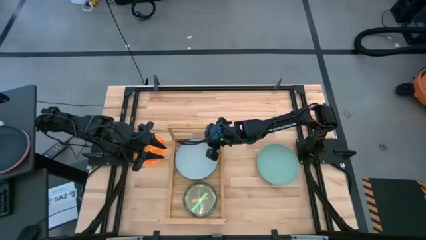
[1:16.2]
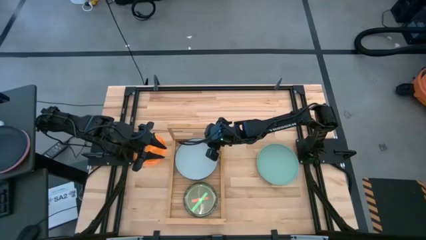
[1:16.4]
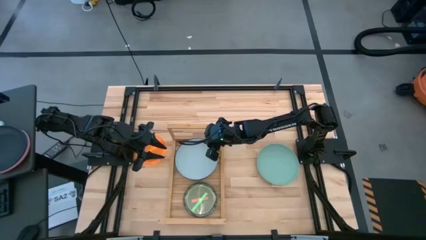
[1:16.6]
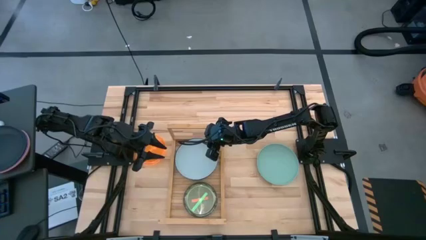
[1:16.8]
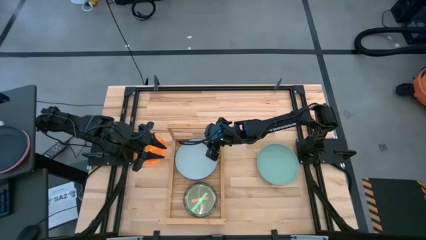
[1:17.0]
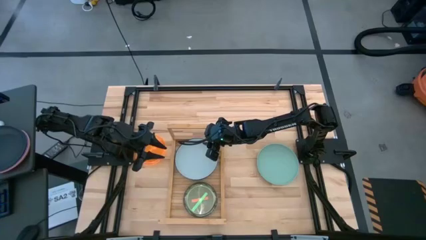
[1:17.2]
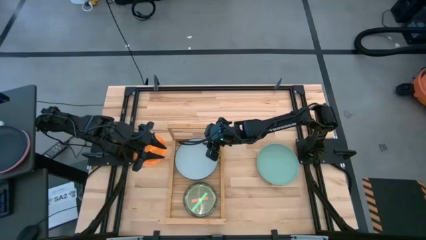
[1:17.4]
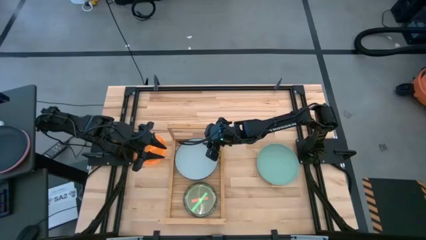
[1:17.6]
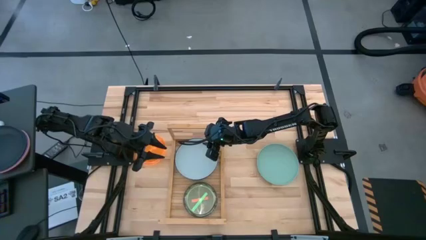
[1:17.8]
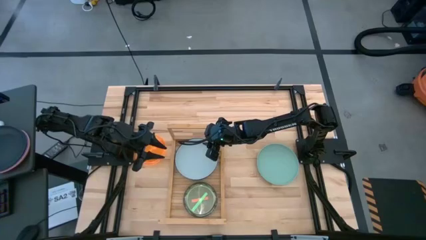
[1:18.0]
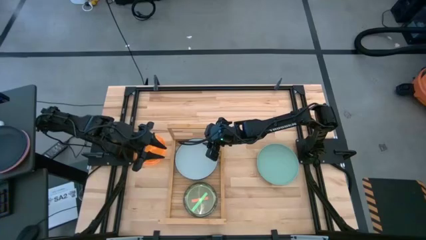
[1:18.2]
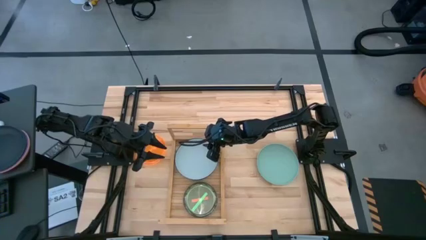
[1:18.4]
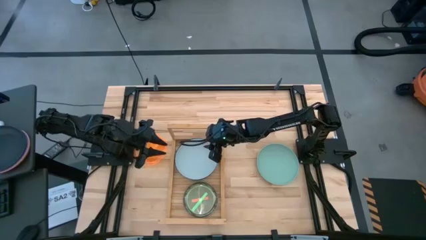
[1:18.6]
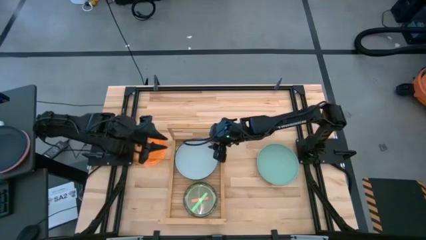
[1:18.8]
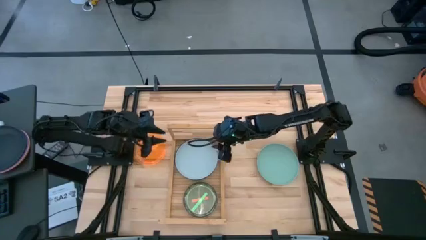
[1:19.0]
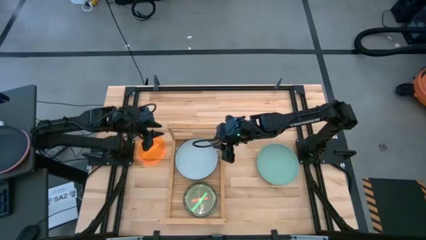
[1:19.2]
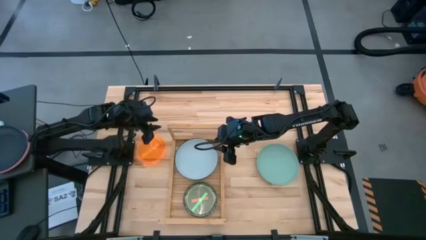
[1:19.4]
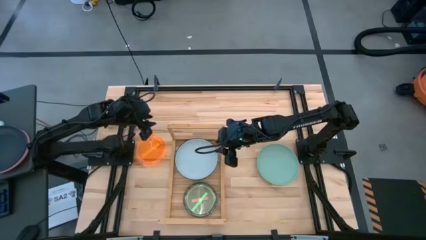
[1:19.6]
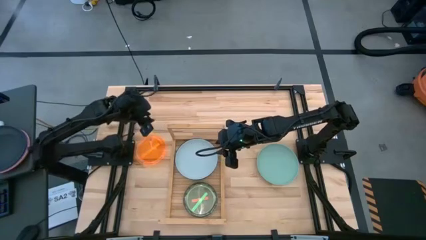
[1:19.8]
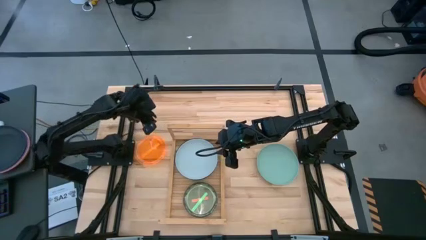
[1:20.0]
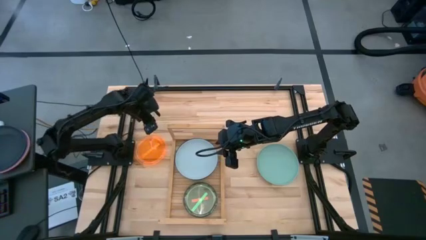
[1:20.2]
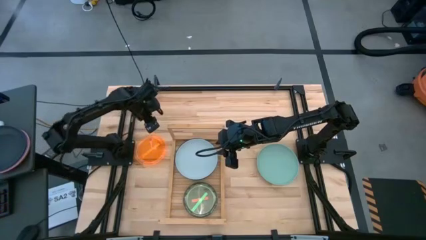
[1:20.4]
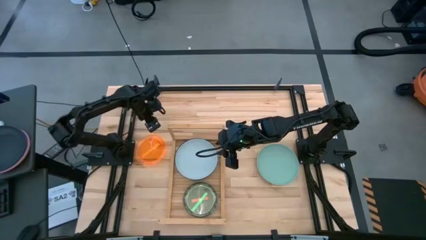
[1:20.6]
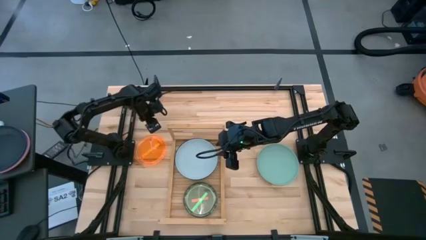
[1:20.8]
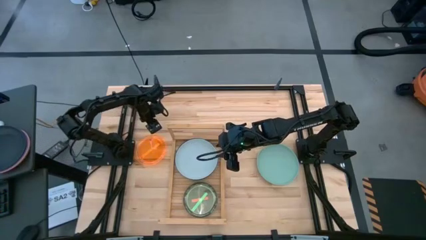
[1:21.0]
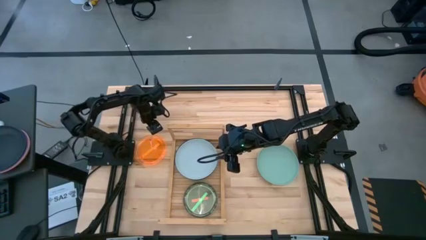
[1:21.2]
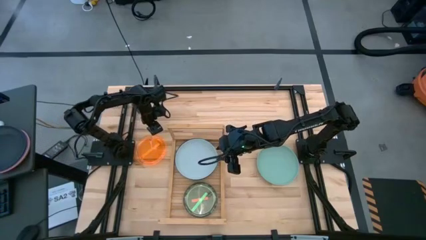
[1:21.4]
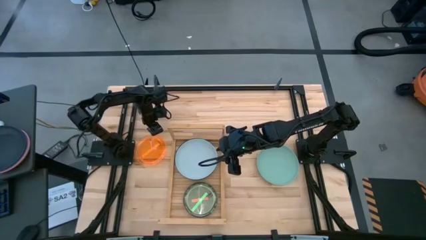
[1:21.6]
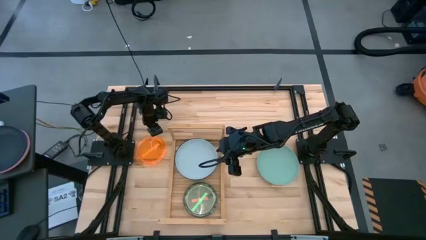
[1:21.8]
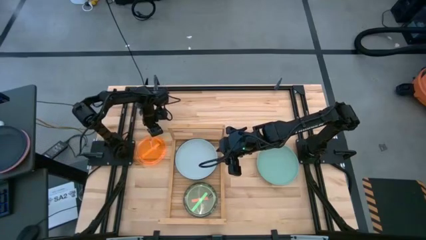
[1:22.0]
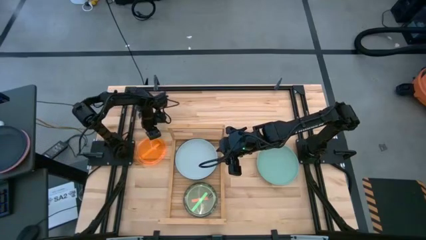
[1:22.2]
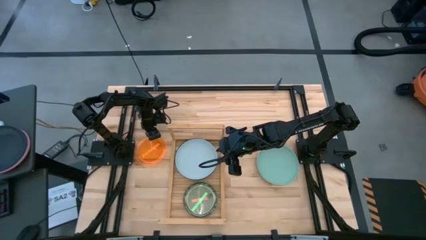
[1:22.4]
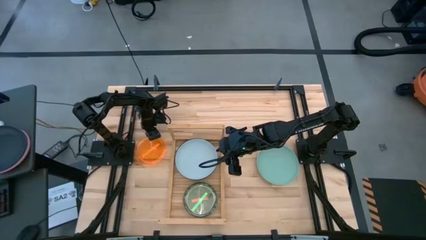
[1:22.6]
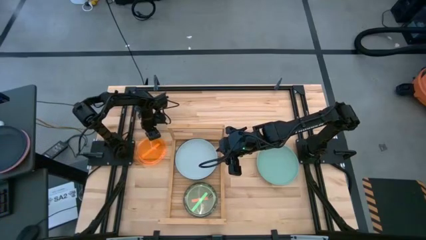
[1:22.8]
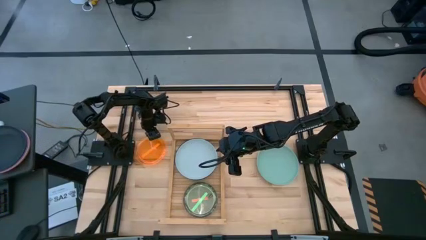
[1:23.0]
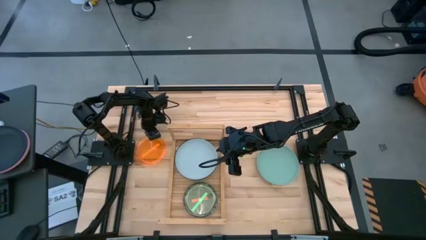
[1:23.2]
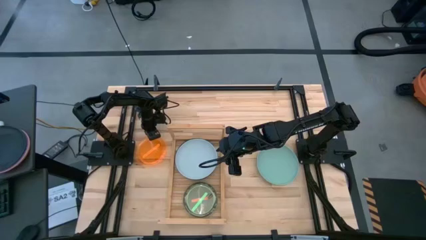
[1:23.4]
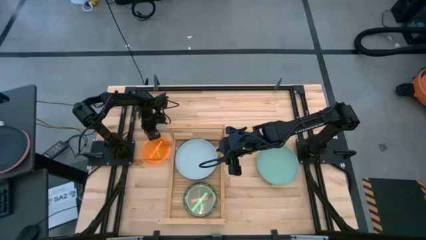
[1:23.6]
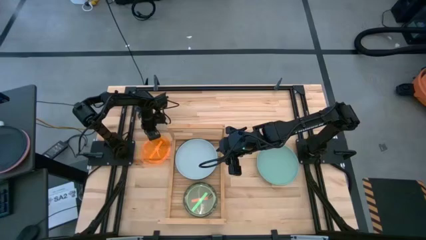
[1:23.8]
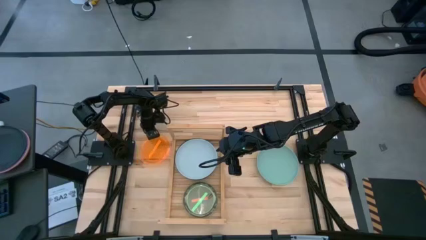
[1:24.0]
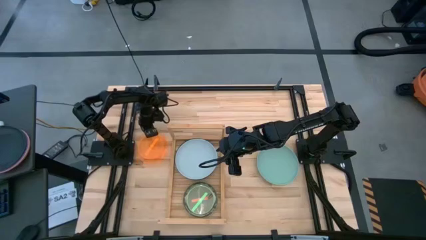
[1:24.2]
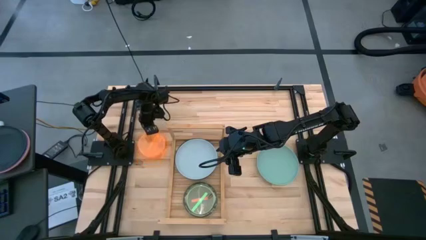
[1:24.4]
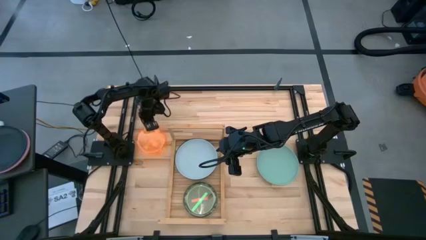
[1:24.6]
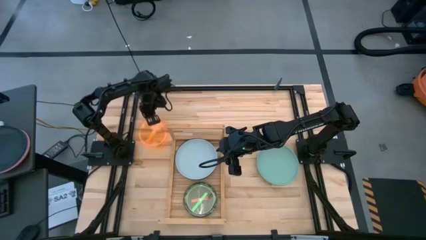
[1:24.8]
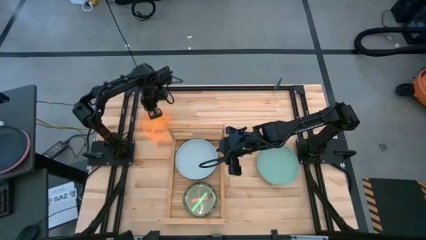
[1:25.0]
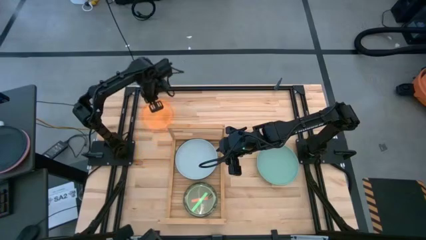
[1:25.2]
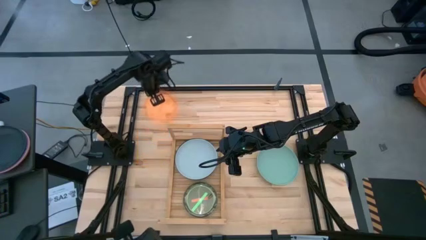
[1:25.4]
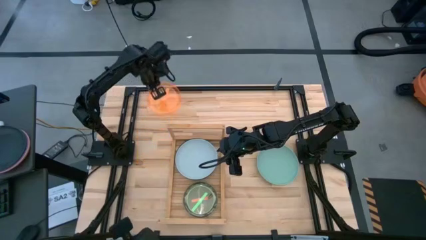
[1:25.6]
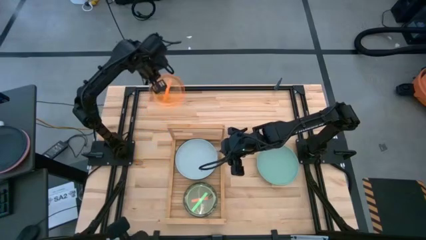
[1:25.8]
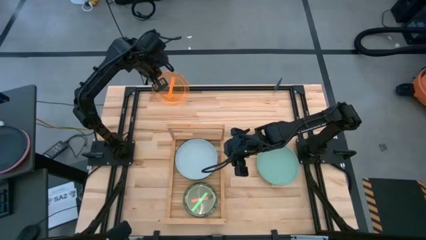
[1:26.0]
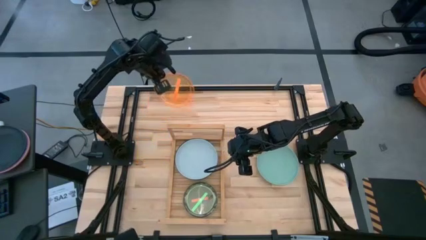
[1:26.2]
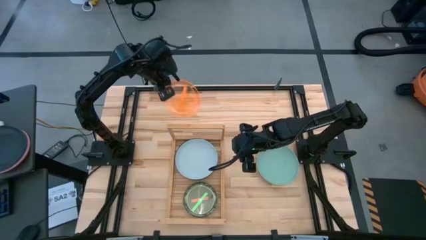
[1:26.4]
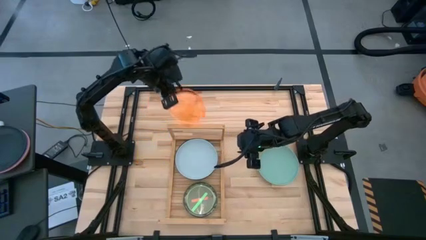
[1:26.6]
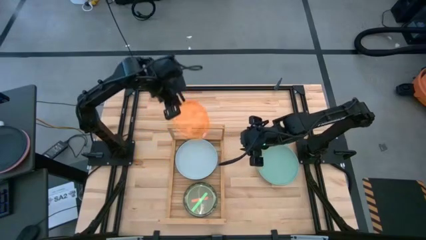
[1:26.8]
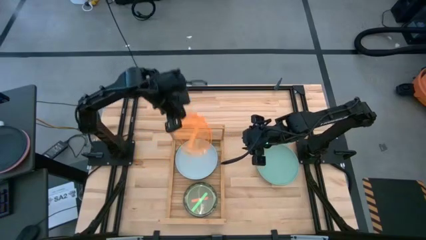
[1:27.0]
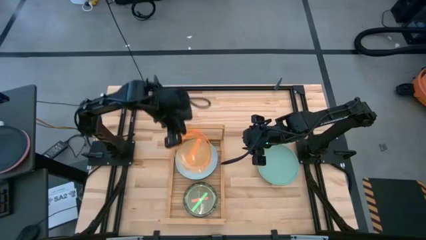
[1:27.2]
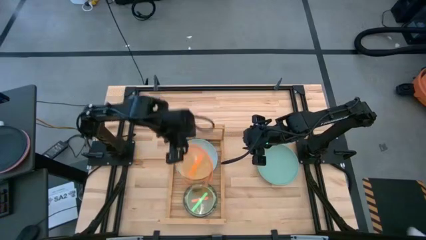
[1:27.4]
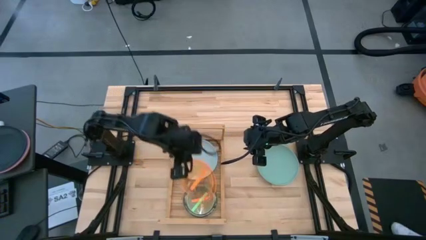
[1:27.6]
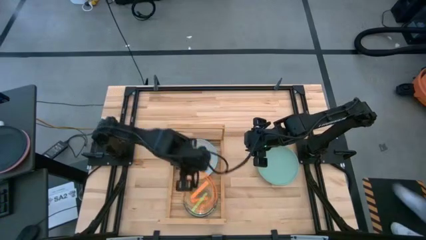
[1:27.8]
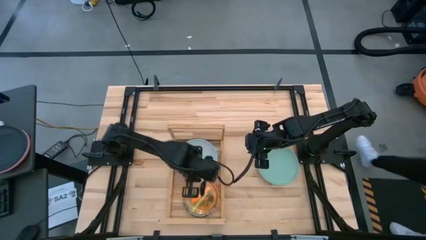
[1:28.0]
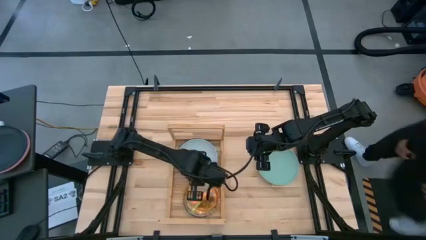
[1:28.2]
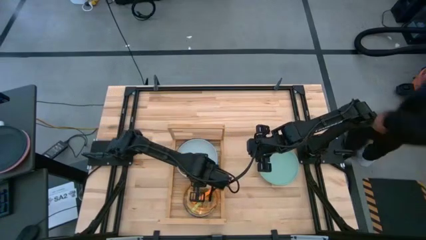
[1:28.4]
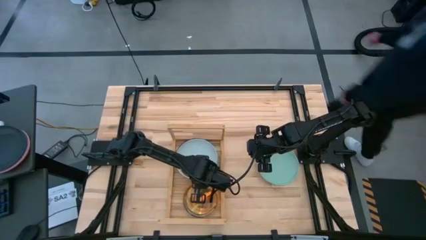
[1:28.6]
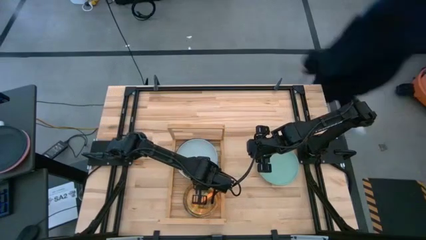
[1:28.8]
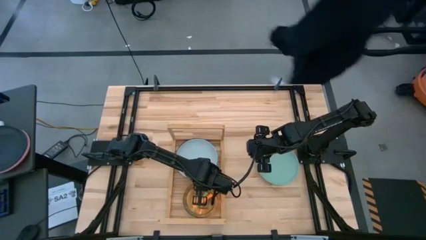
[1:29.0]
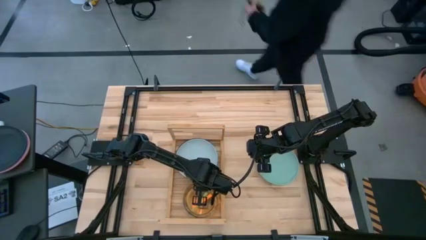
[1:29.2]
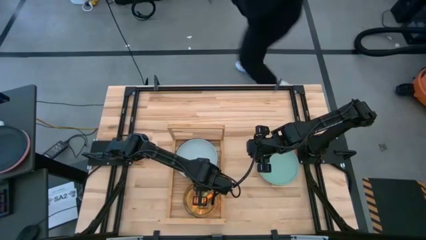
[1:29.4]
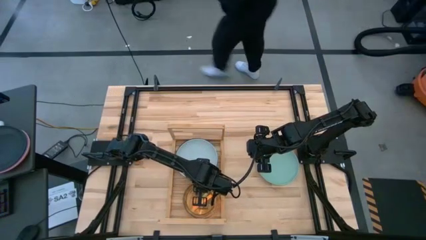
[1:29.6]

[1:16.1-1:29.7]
Task: Place and stack plates onto a shelf
Stack the small orange transparent plate on top of the small green transparent plate on the shelf
